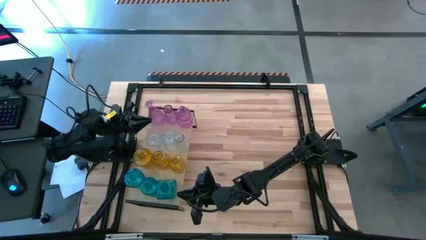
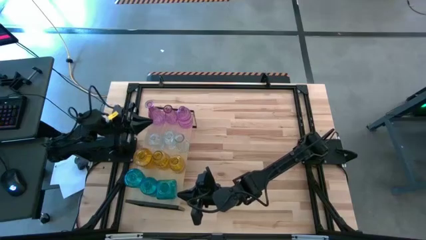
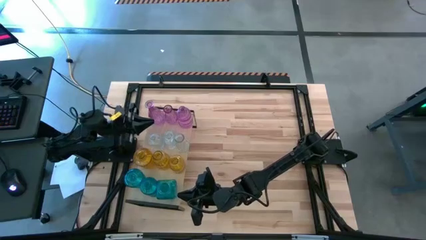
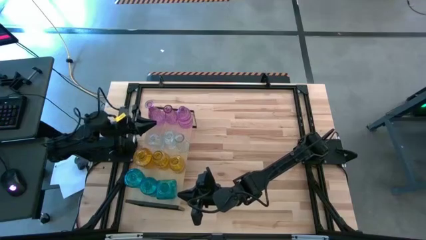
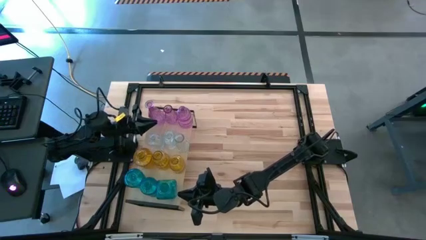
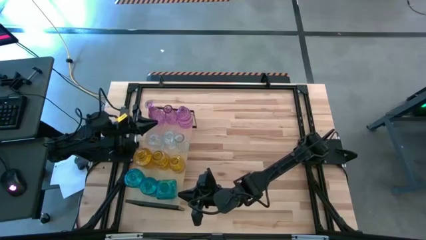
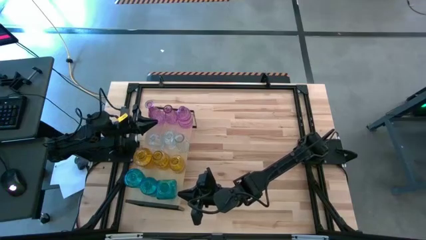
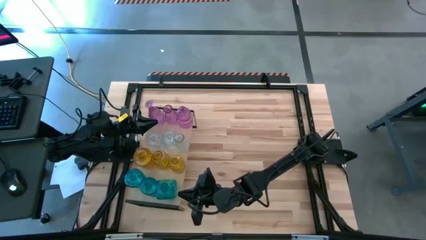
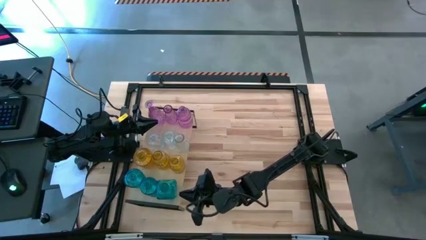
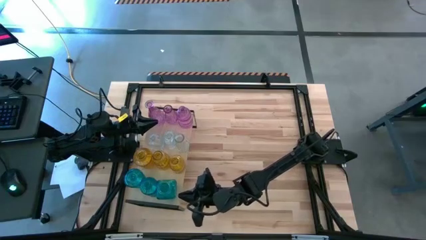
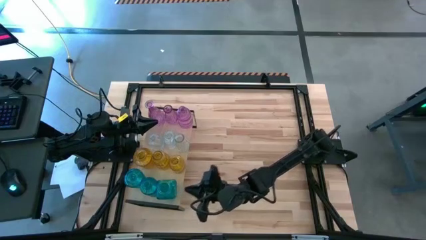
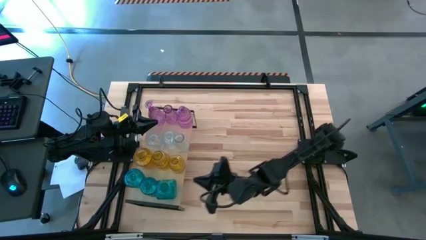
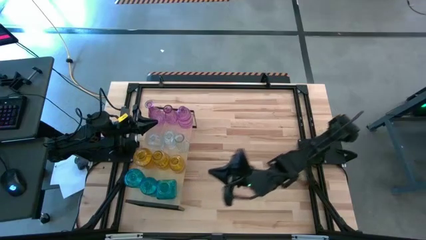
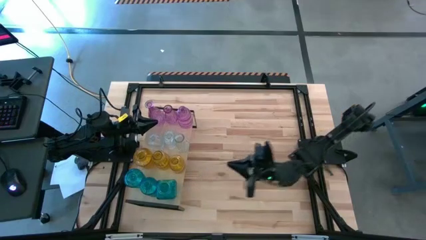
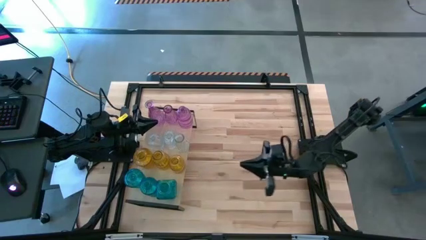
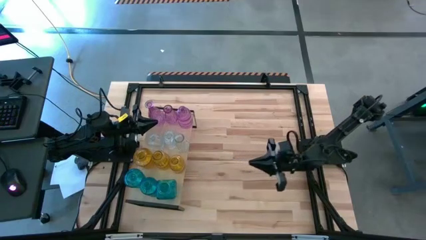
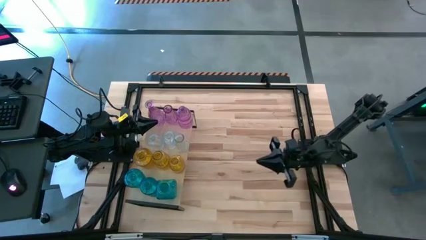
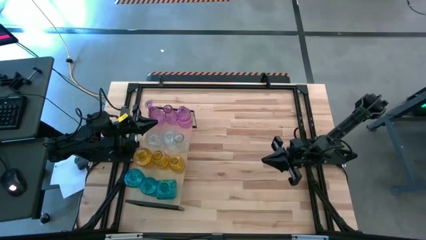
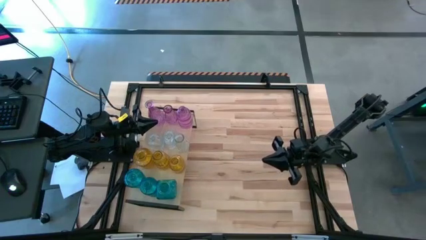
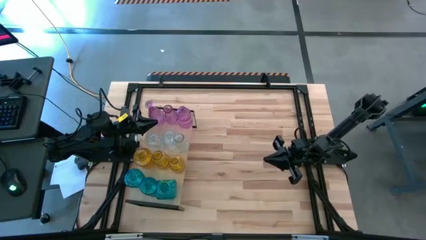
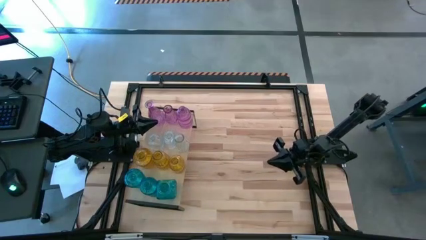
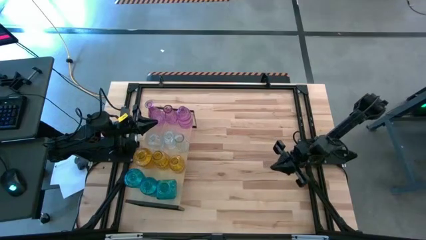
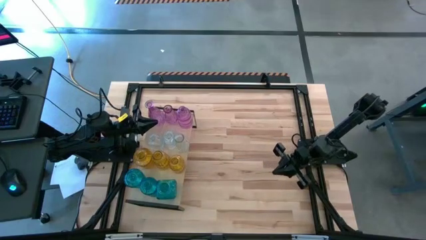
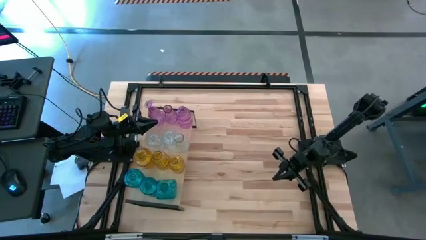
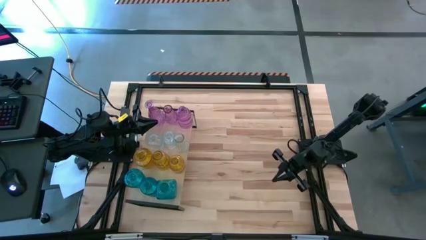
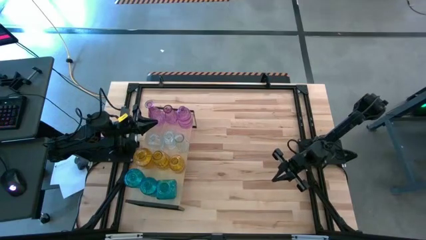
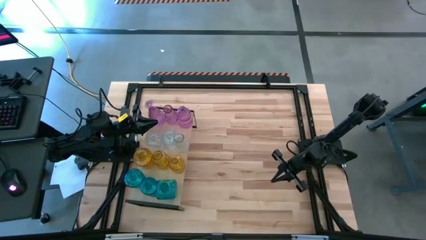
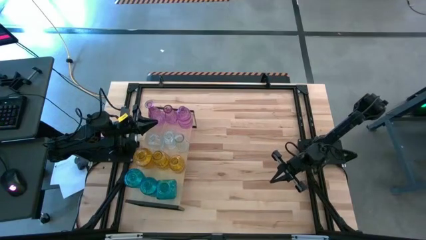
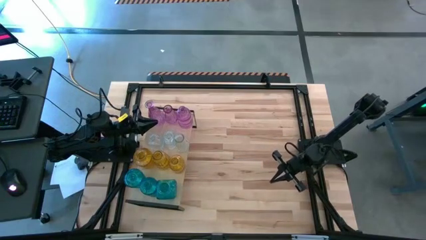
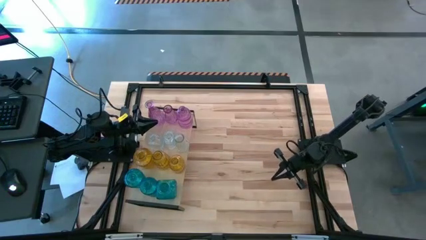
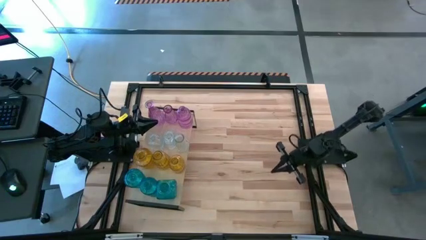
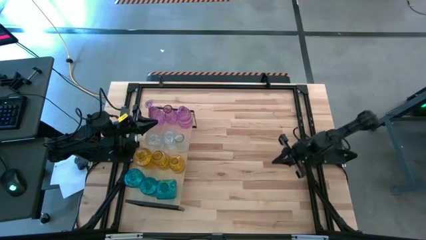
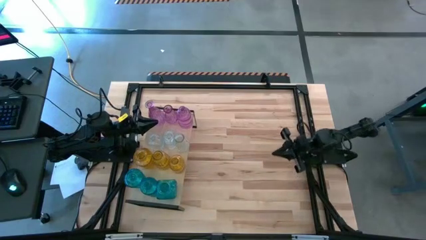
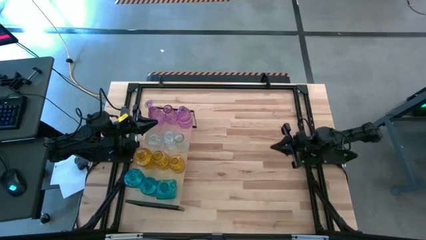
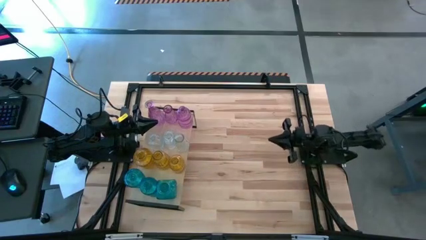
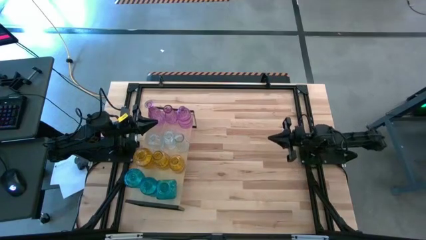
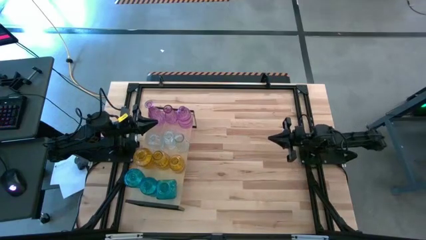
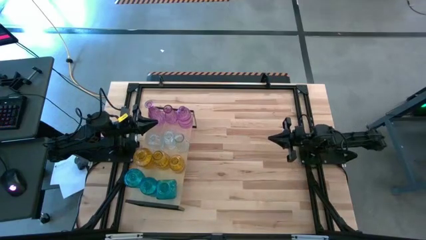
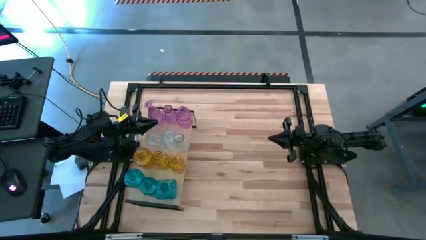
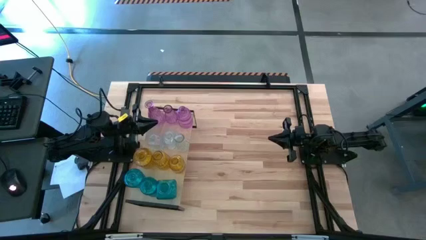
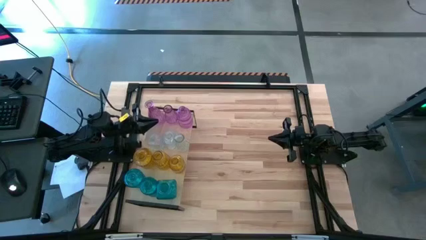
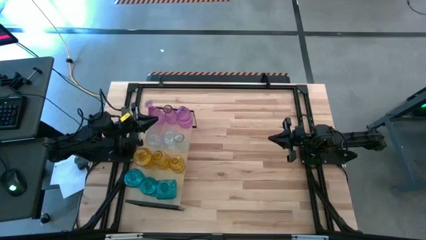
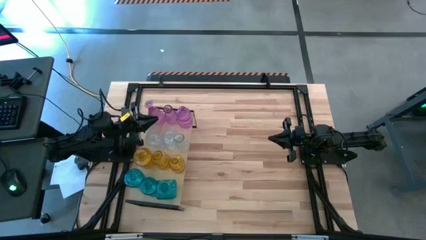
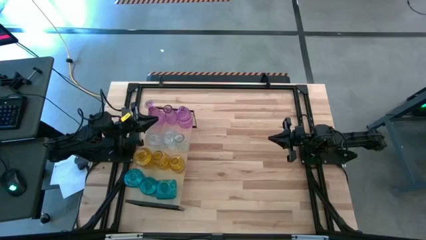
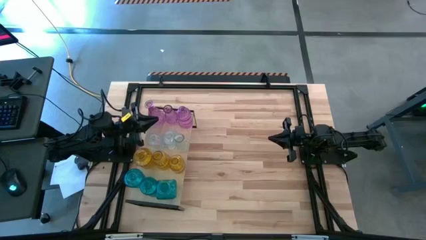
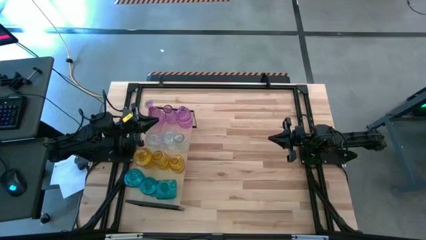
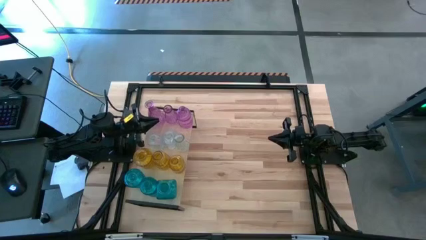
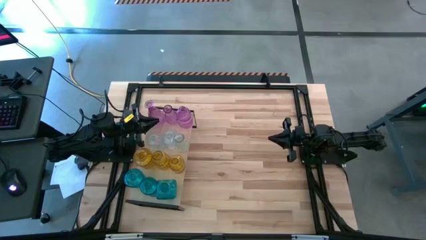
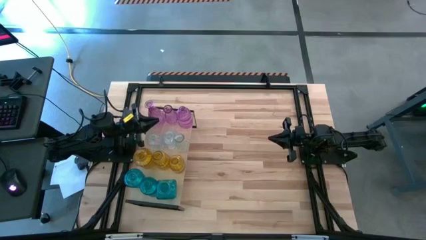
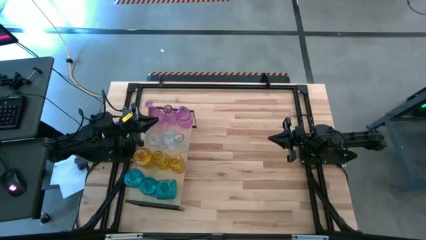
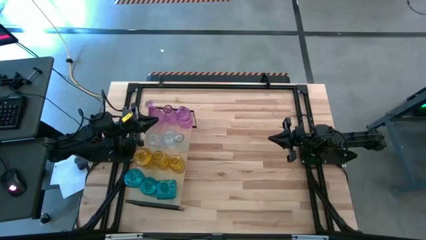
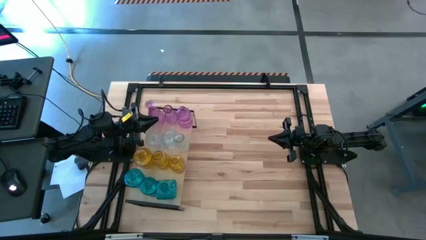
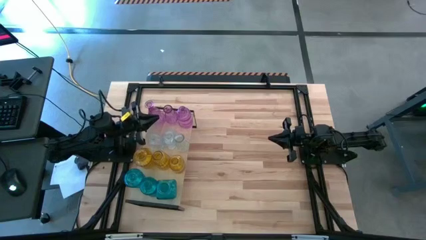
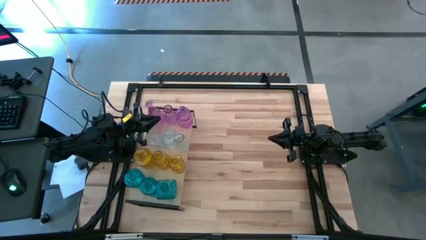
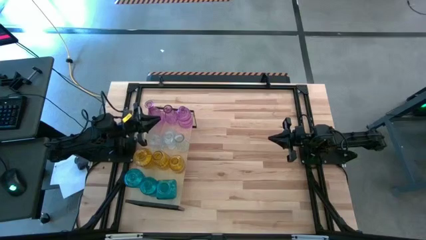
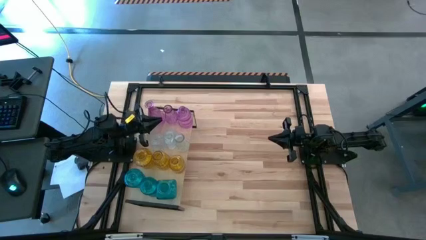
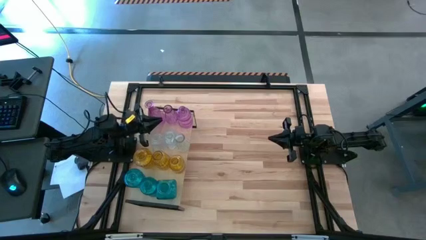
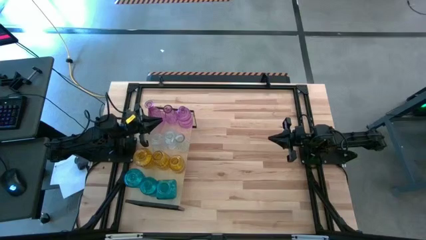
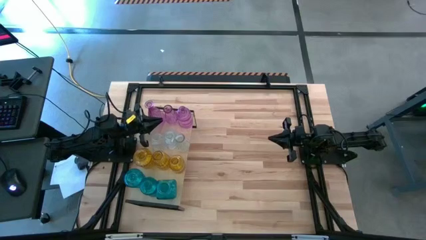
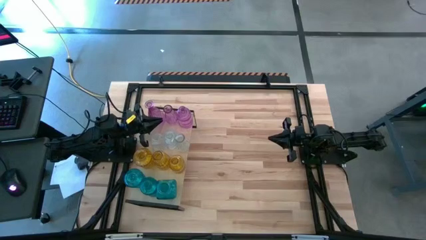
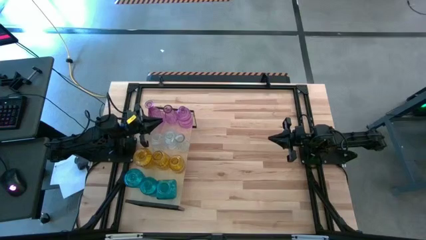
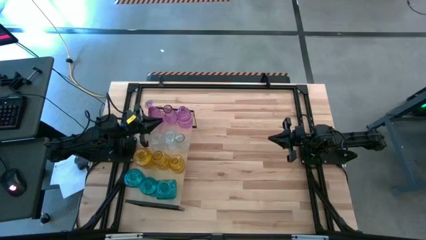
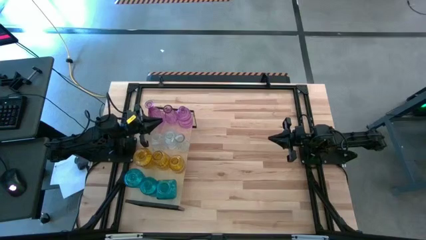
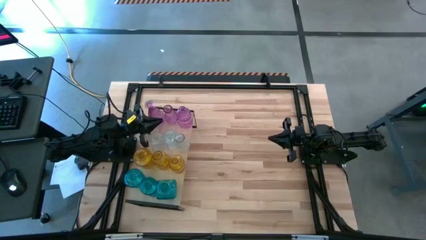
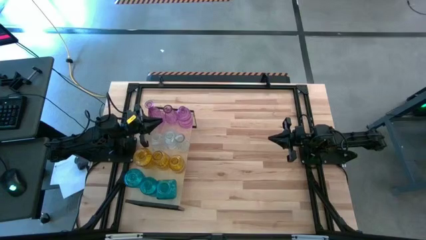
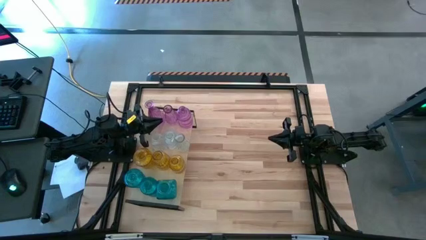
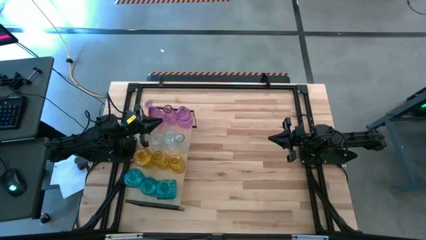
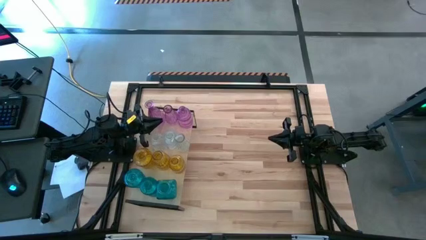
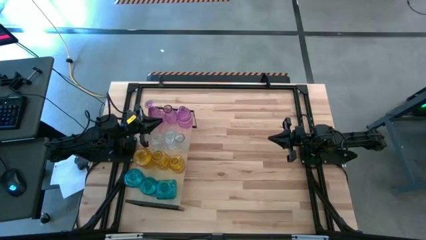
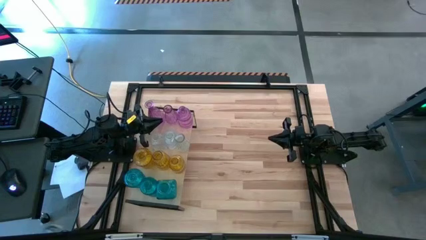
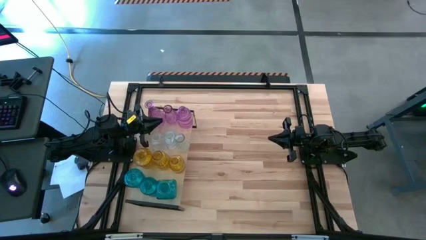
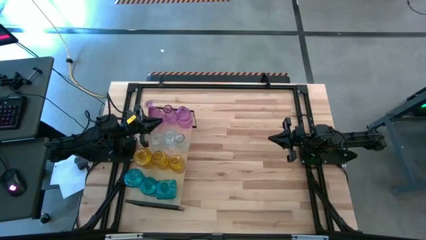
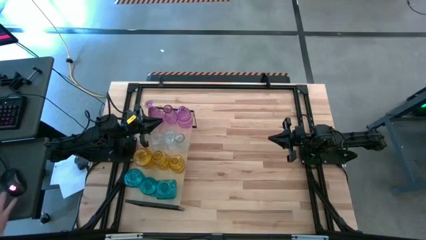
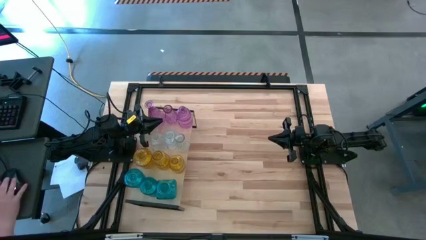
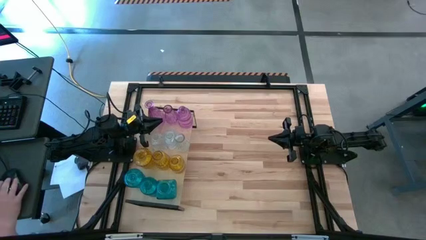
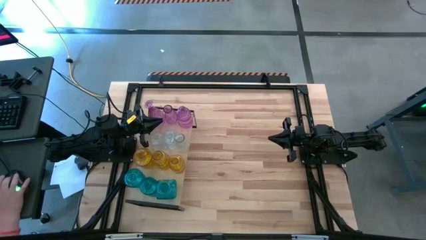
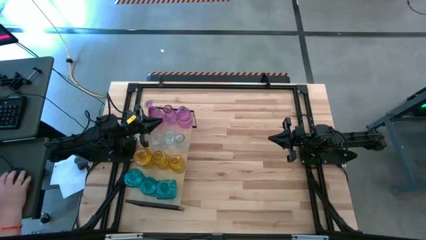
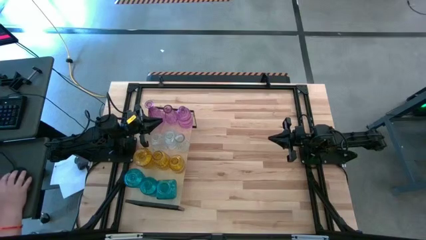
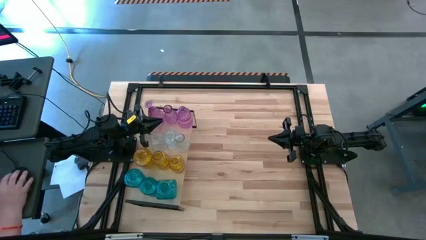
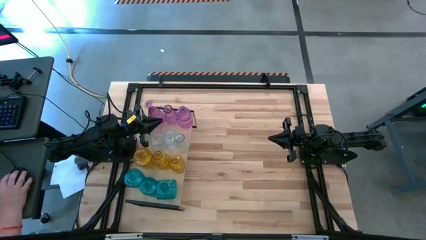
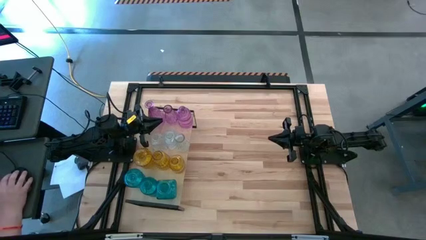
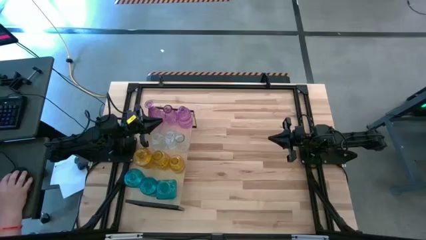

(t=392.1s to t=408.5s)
Task: sort vases onto shelf
Return to Home Position
